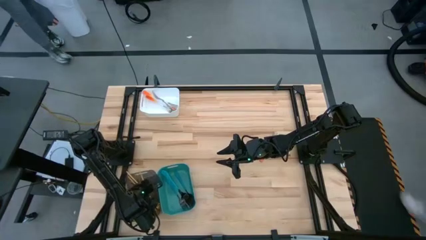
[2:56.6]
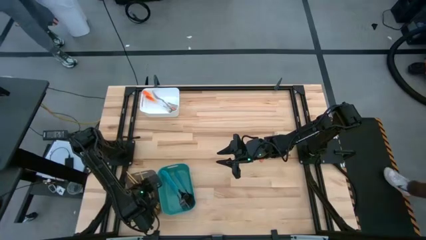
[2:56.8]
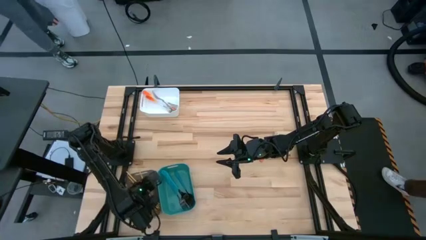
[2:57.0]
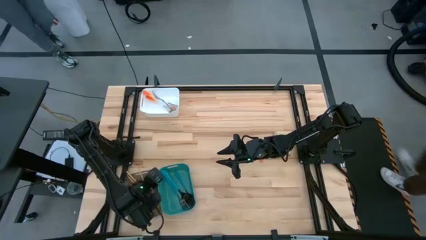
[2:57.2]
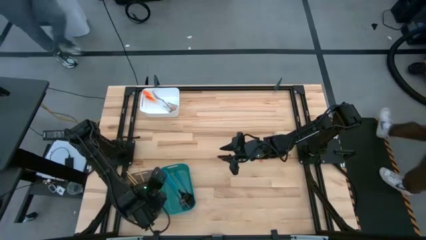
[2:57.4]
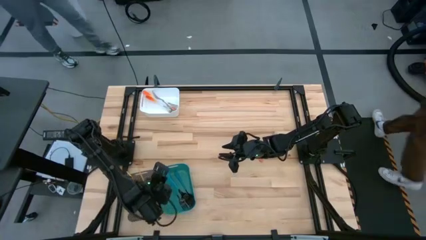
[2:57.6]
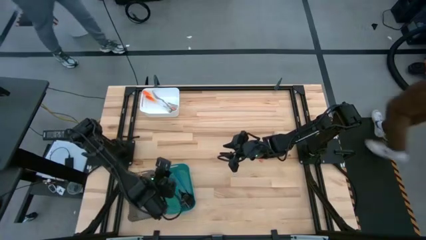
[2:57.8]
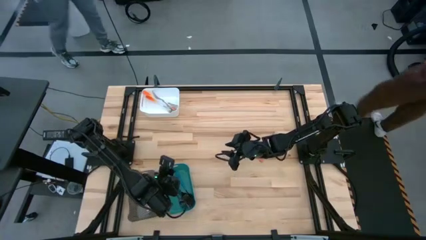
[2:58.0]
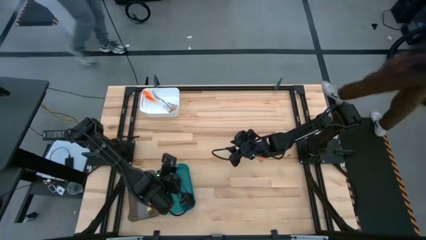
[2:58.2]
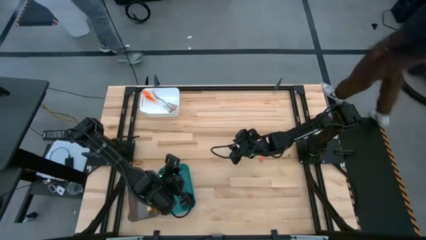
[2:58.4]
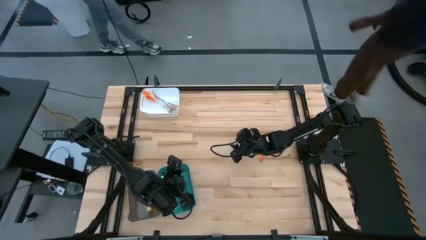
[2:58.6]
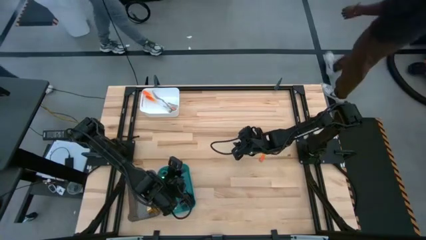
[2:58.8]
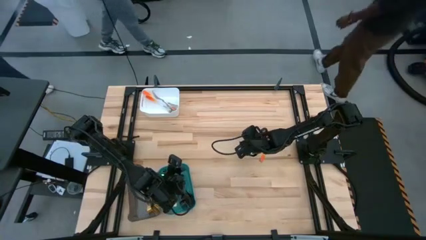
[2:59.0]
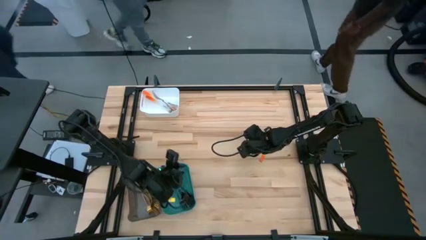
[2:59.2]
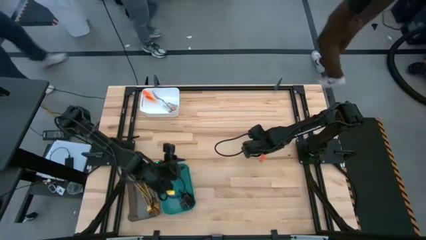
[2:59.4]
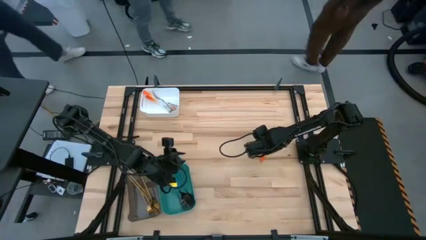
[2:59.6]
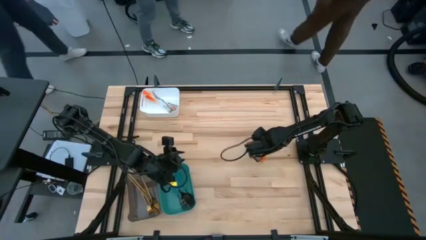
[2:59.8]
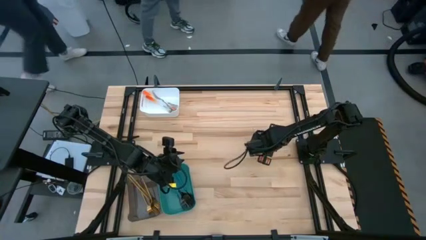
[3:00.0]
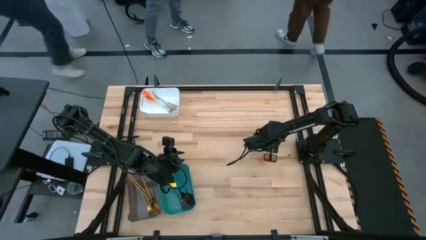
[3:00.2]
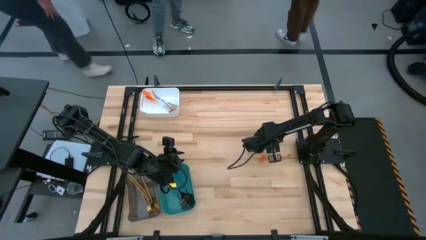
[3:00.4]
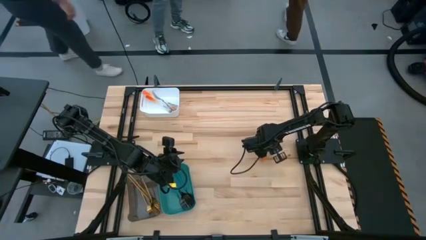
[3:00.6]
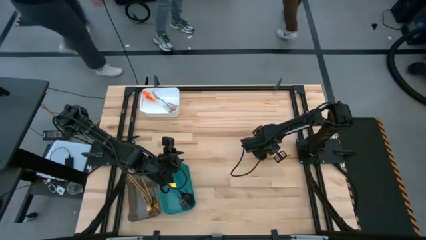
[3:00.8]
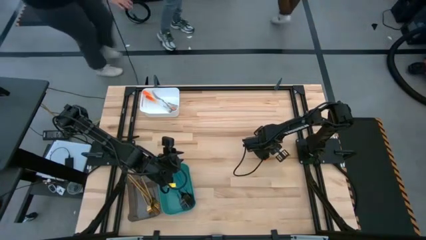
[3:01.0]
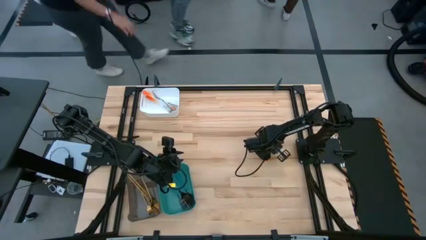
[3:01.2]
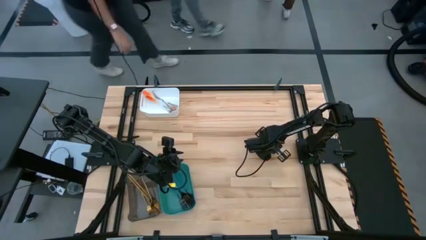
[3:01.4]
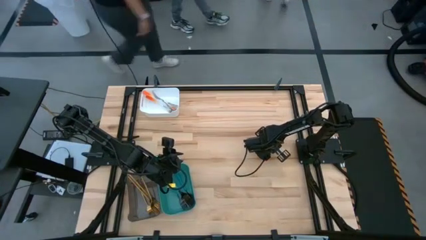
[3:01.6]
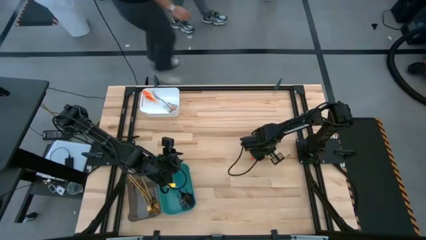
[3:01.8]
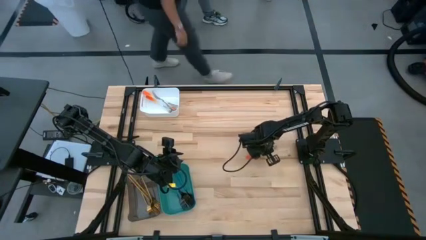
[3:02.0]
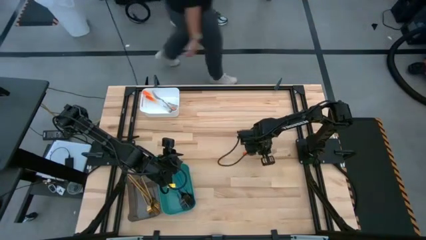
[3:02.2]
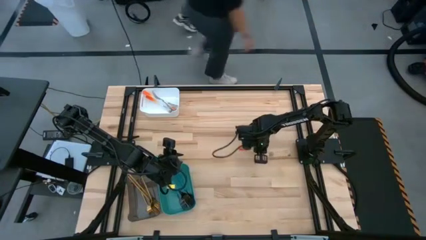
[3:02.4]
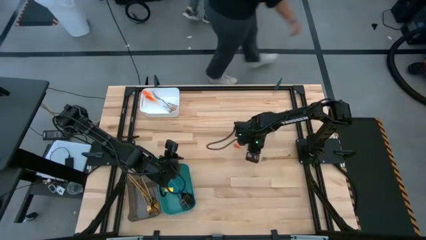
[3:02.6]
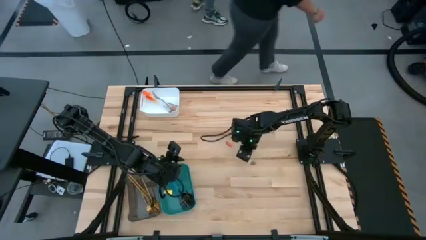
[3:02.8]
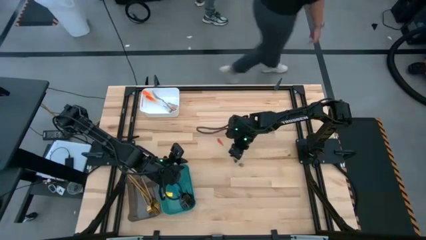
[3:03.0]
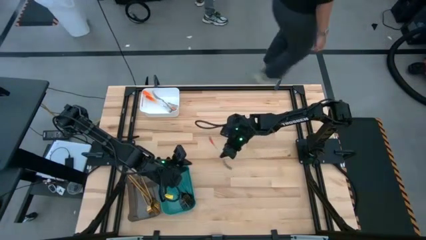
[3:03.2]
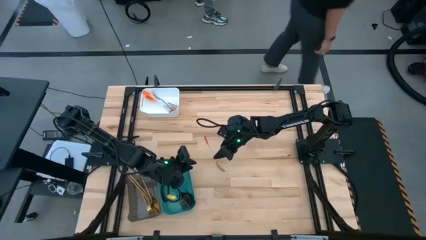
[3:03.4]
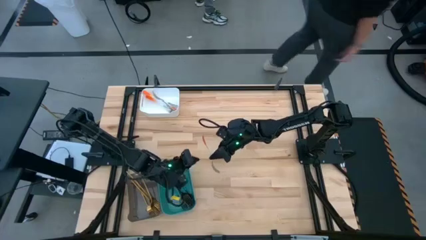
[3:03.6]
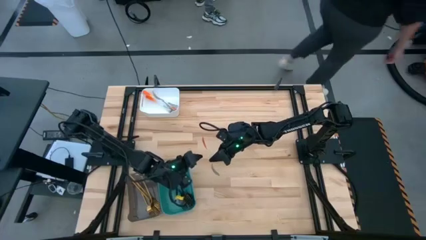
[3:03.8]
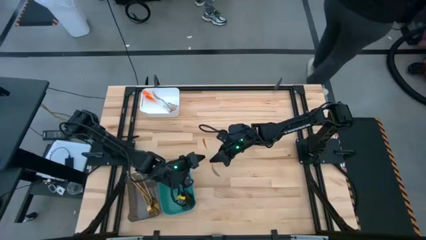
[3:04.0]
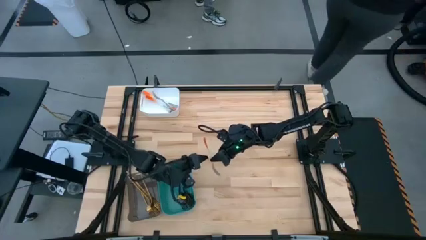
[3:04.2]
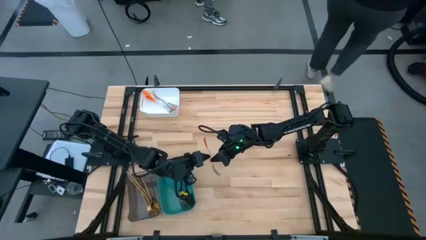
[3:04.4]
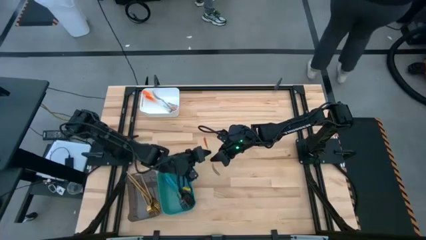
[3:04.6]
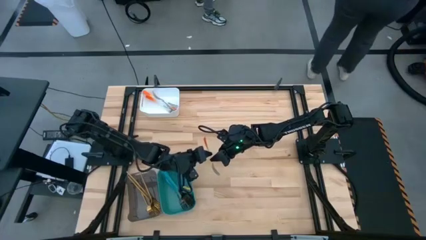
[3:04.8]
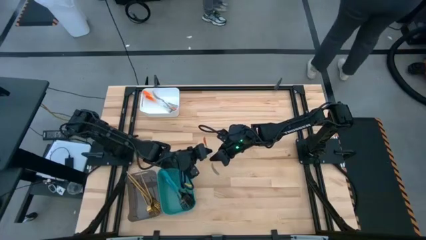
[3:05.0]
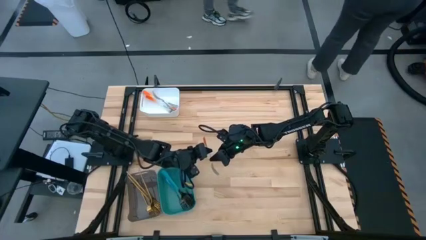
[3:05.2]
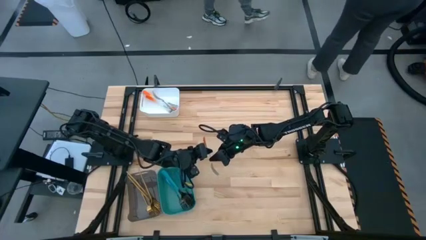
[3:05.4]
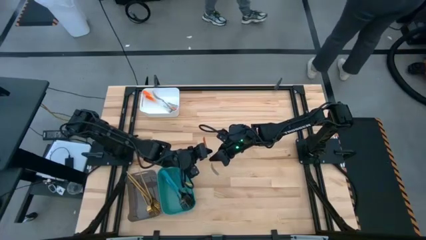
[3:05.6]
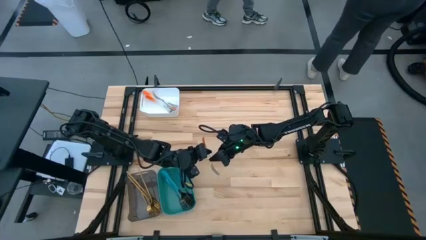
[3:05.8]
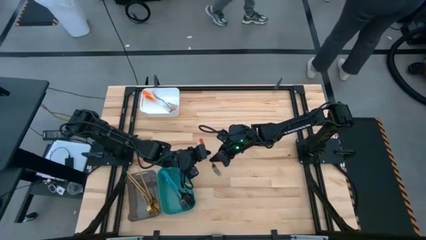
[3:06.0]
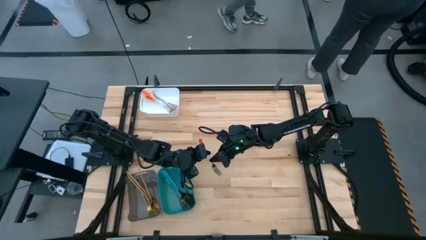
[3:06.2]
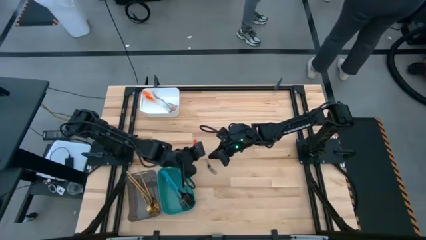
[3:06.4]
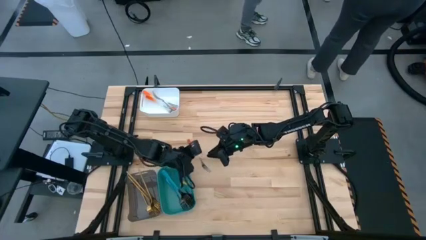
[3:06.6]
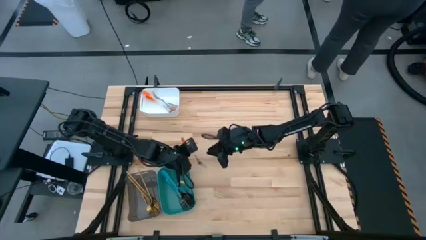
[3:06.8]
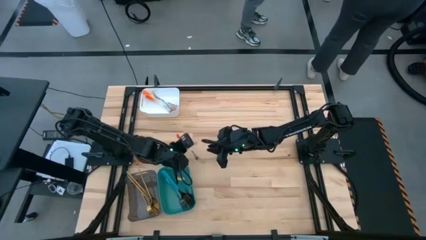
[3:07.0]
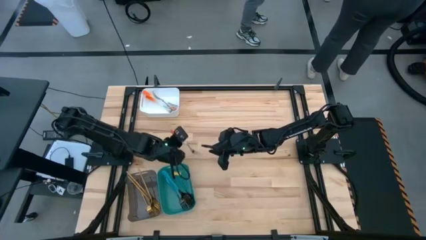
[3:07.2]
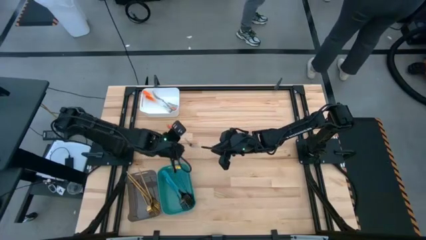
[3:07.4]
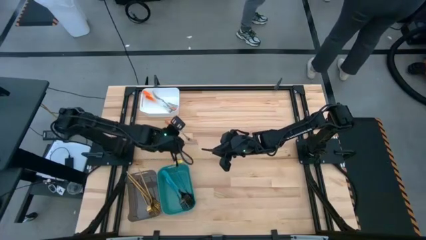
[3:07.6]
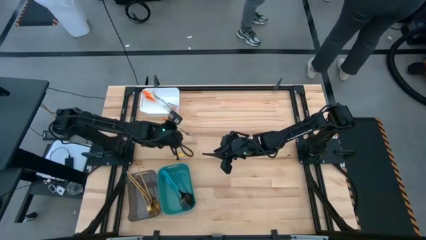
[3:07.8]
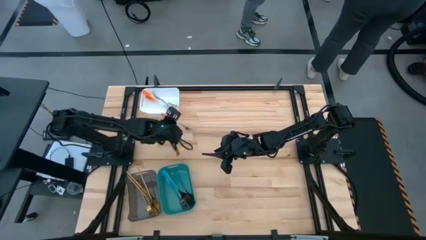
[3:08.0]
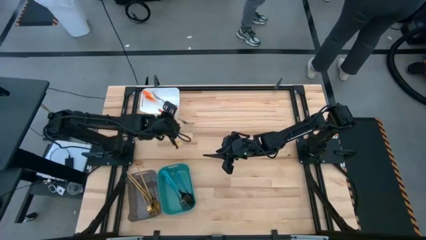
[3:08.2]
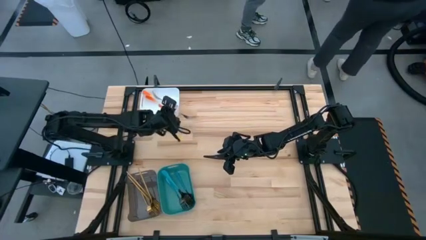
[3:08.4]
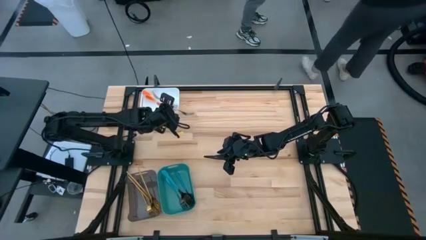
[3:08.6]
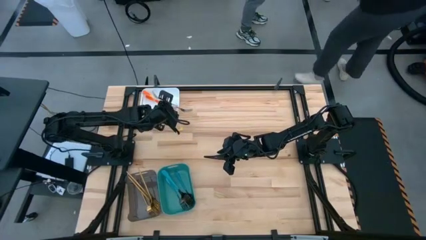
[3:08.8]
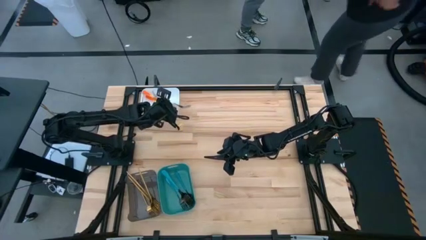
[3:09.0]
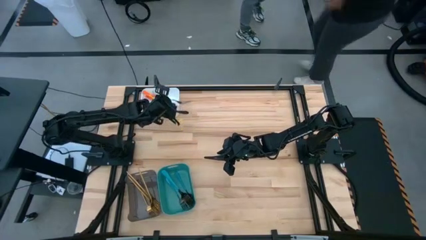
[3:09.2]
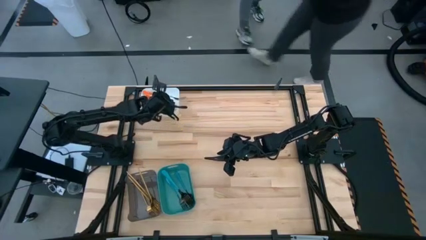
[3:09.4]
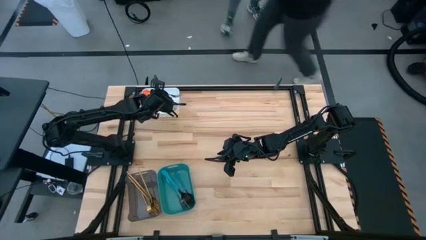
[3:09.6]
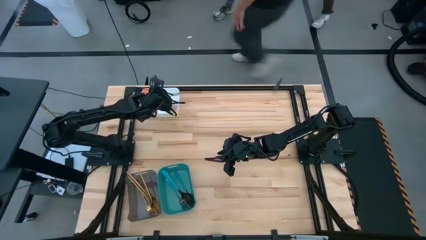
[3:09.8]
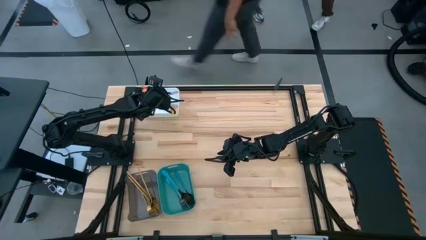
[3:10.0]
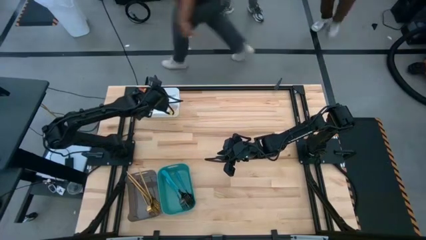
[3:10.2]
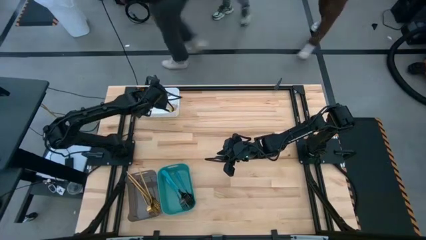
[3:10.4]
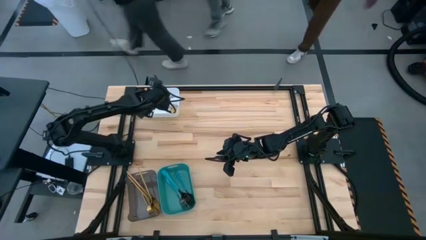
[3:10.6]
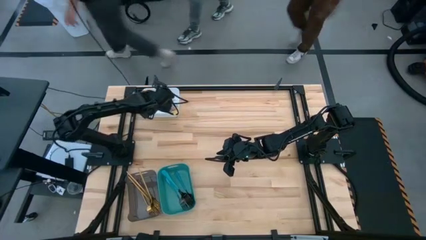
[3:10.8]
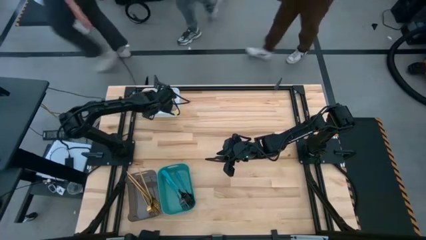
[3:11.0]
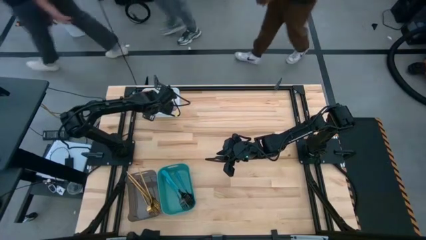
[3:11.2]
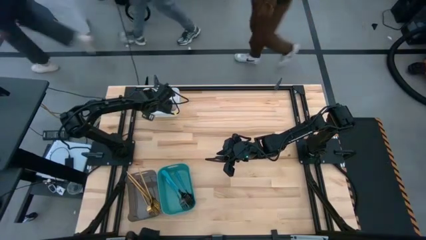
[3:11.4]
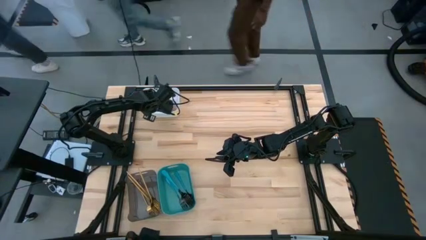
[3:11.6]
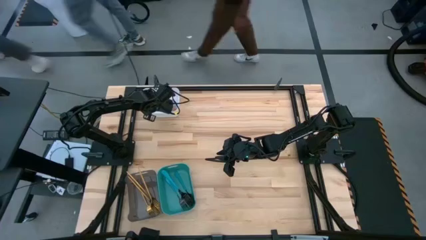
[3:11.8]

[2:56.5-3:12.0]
Task: Sort silverware by color (type)
Put the orange fork into the white bin
